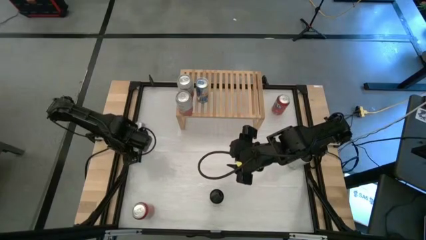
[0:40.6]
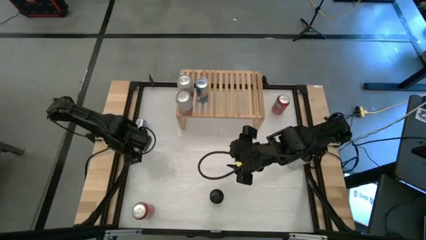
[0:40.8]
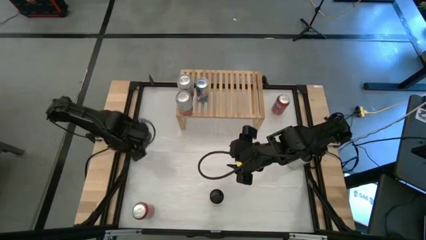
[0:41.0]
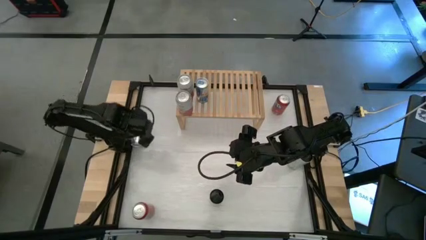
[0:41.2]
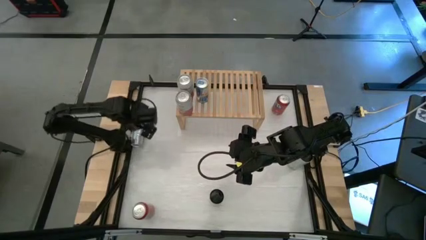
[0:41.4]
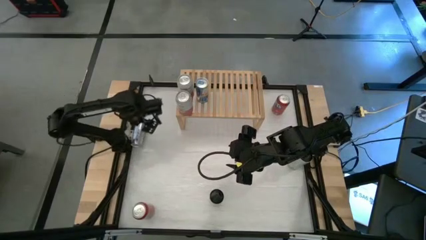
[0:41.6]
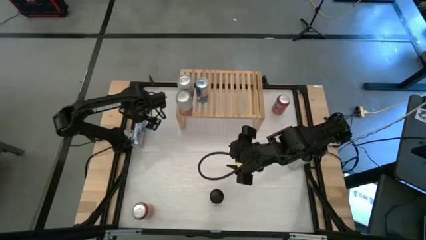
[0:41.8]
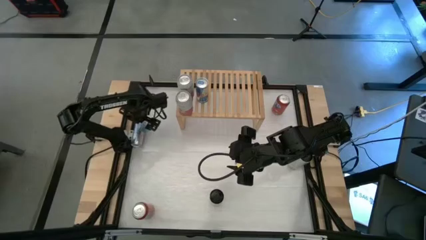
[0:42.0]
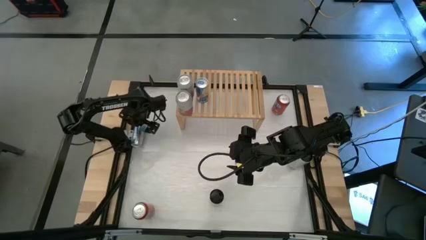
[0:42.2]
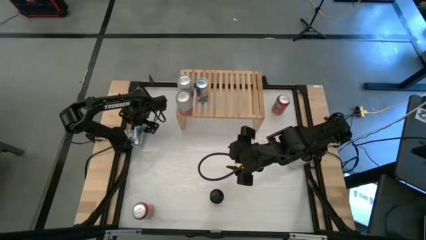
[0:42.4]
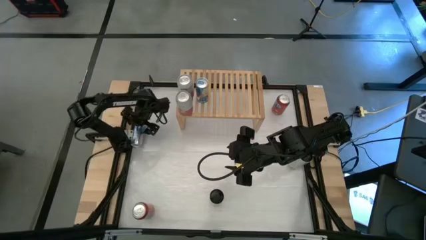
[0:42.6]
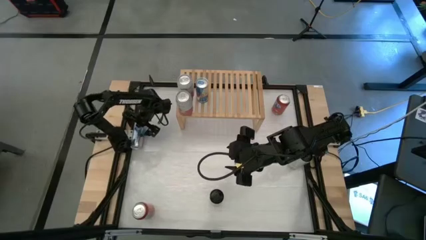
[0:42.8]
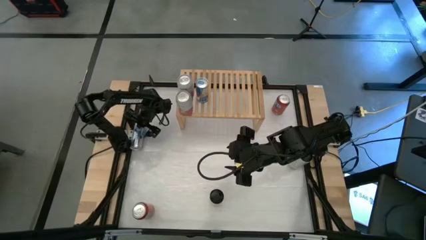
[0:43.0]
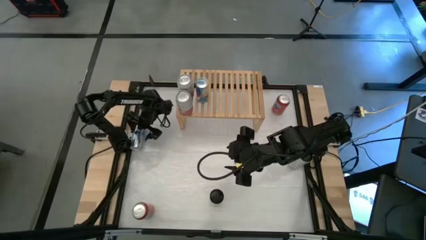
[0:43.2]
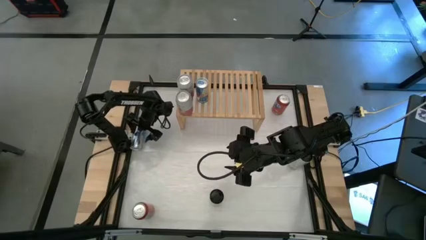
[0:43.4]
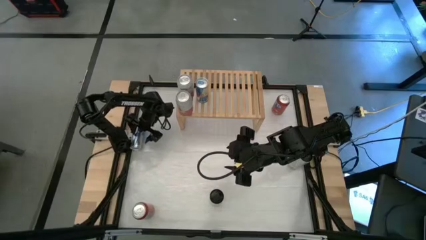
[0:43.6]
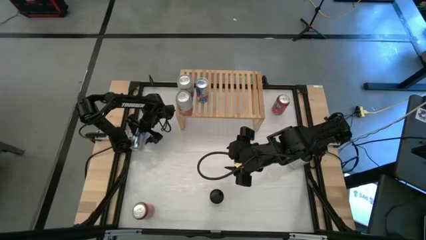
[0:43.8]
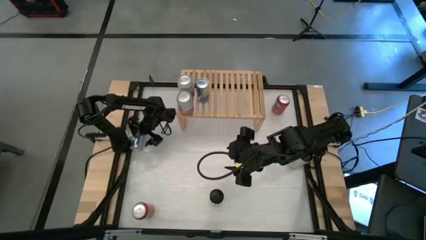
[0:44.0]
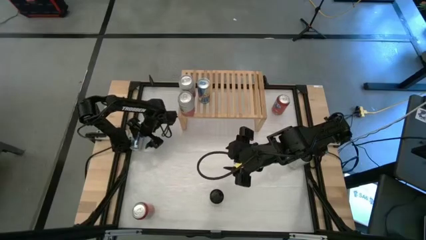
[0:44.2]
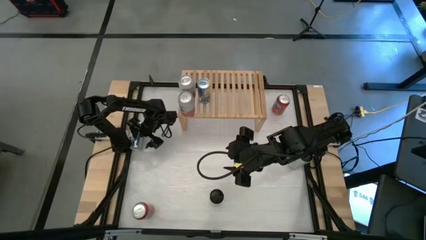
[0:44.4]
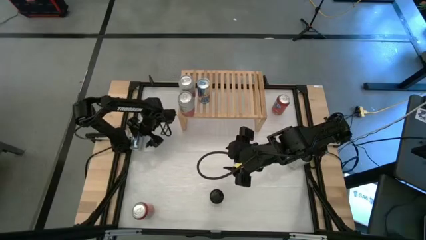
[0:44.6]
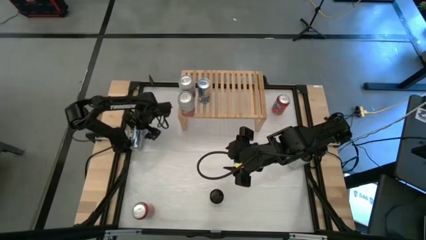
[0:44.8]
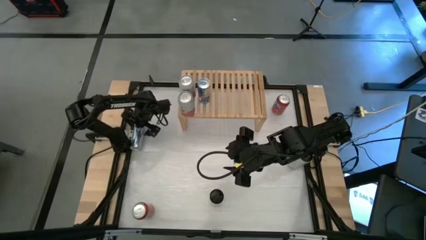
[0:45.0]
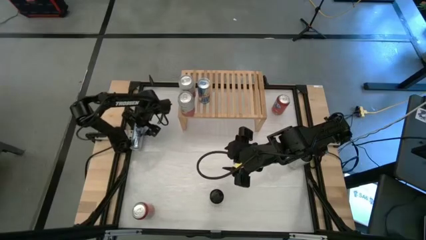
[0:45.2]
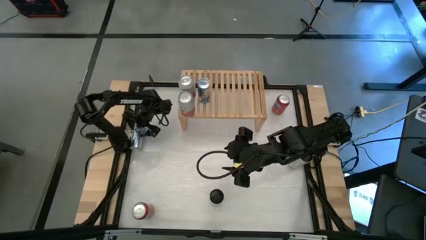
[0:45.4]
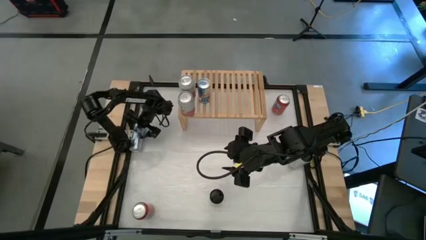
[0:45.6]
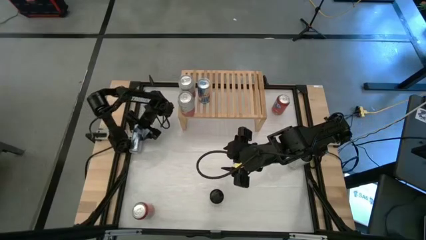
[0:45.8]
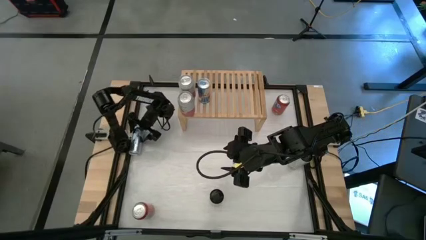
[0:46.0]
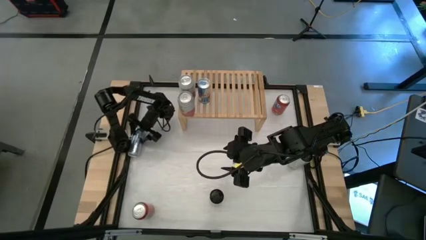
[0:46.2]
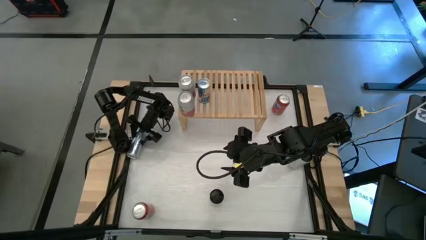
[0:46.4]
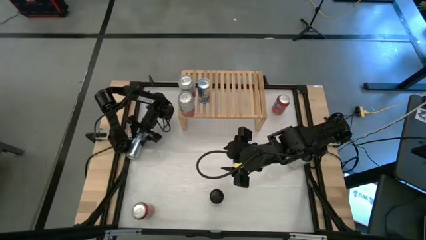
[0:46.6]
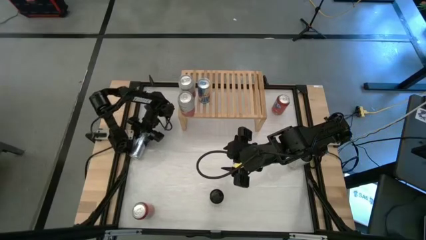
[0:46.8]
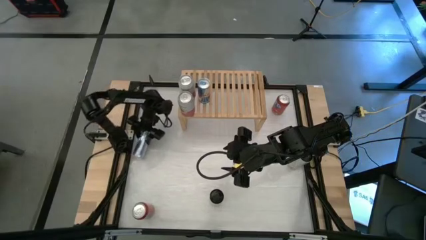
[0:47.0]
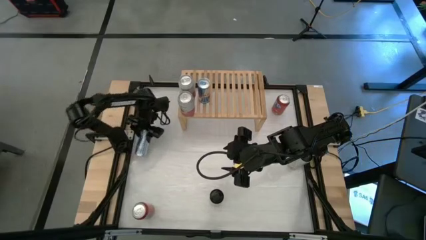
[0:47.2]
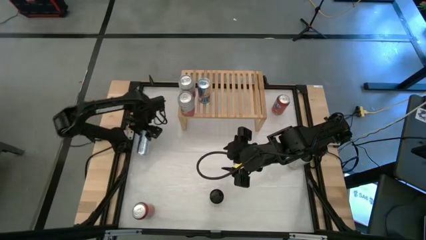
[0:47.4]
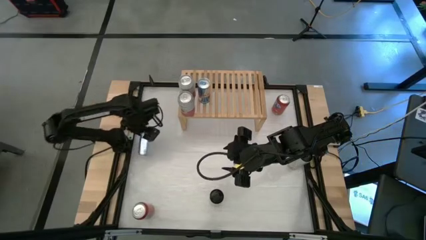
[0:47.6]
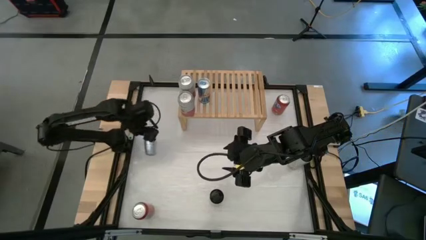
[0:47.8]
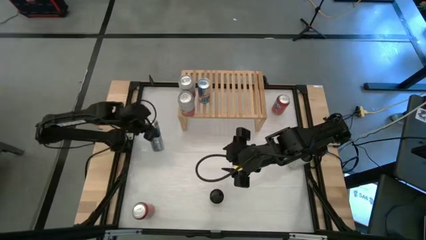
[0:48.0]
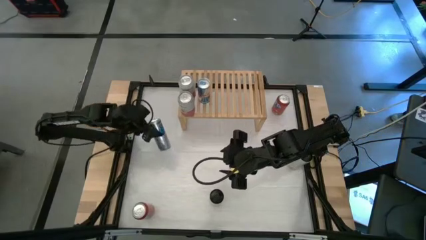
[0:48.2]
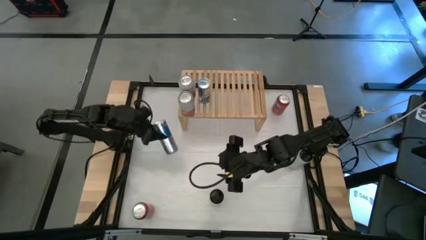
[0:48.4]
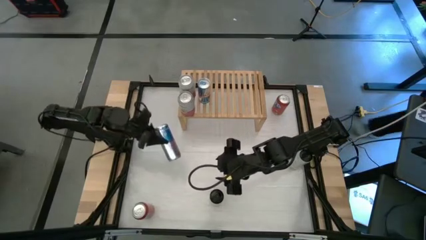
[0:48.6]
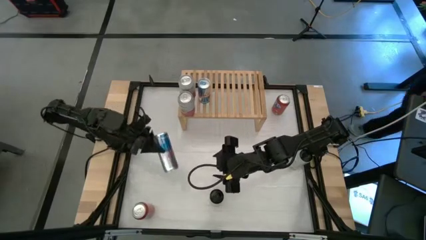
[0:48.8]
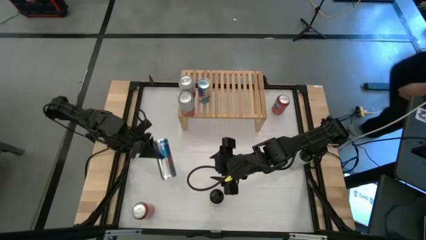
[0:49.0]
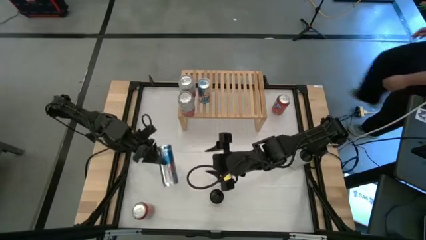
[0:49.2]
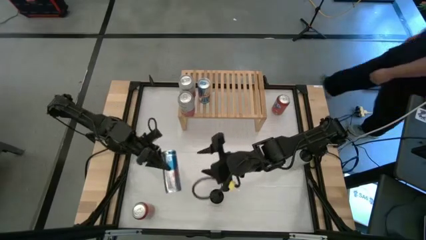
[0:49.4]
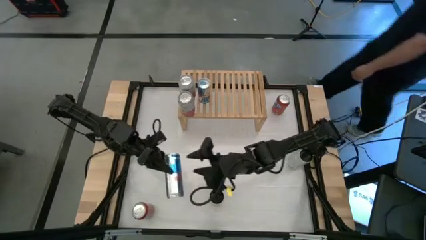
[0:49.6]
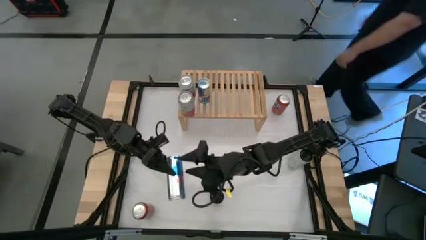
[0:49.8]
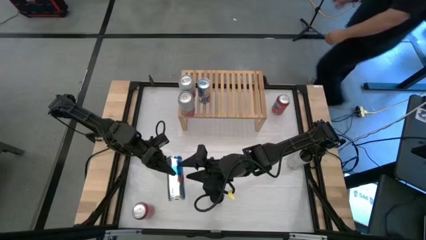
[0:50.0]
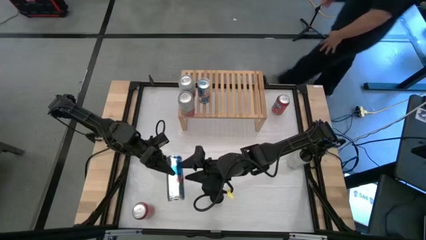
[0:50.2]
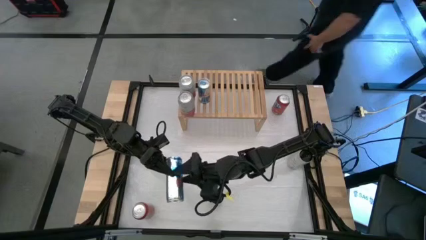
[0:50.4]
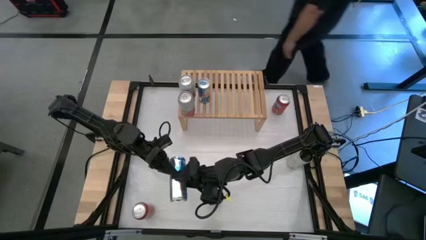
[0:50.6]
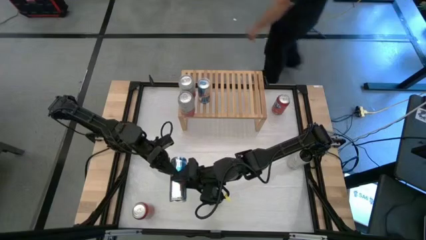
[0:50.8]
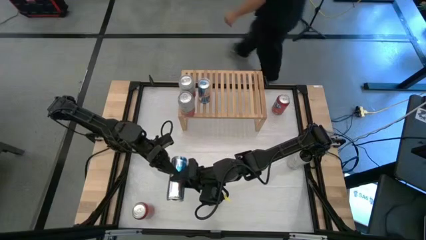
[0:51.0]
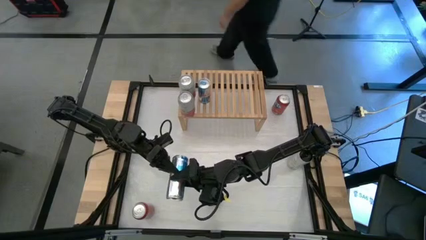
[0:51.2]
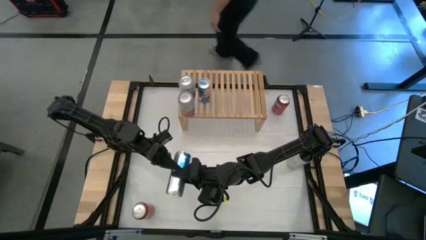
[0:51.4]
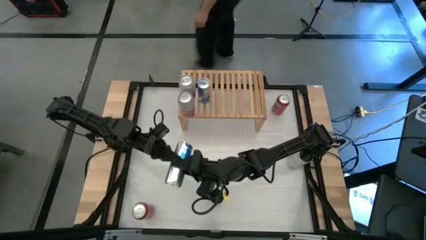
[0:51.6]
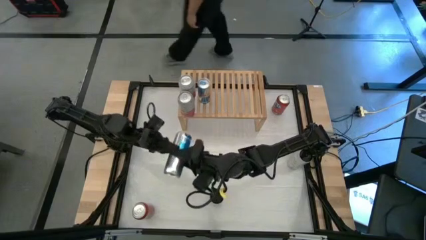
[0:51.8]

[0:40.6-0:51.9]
Task: Place canned beverage on shelf
Put the blue soda can on the shelf aligned with the other blue soda can
